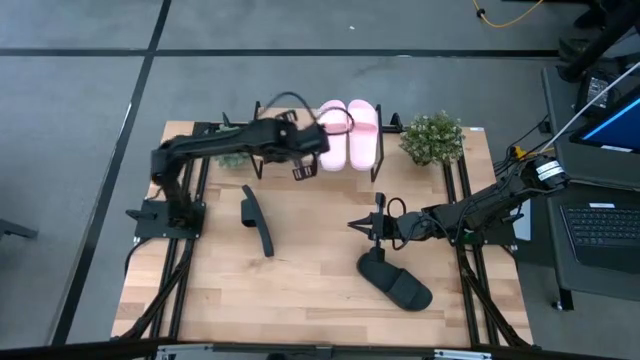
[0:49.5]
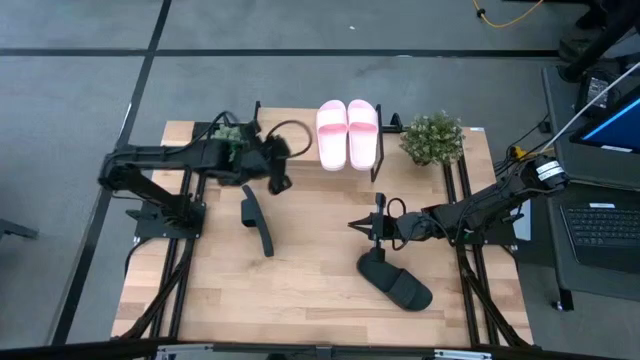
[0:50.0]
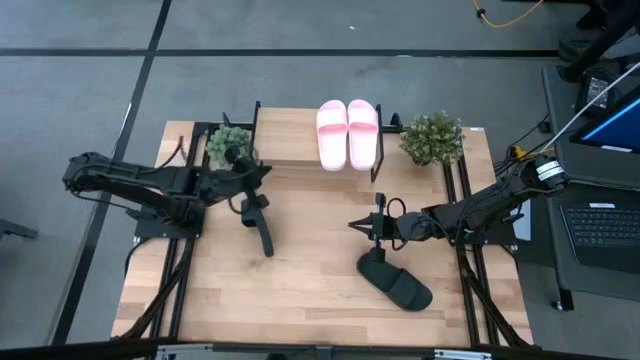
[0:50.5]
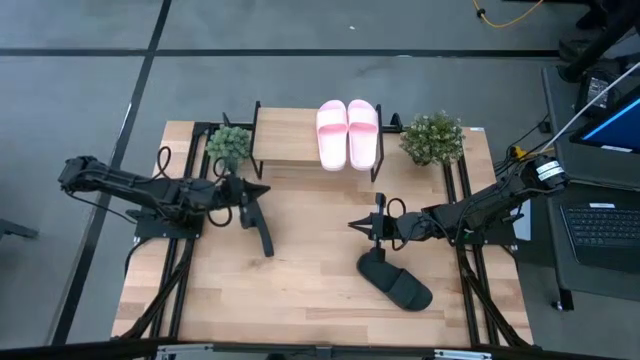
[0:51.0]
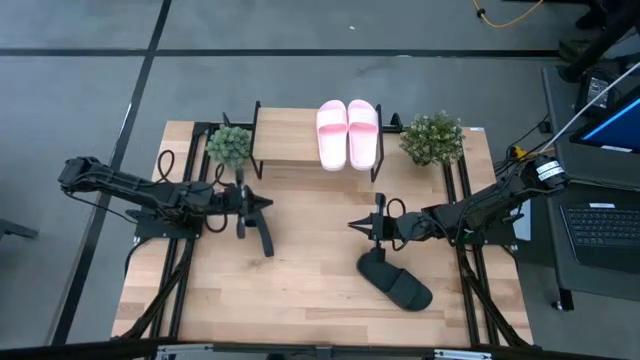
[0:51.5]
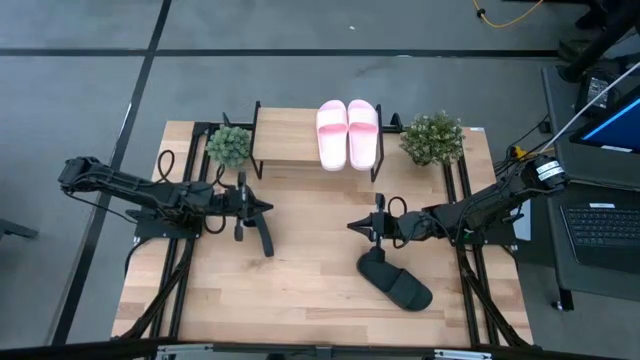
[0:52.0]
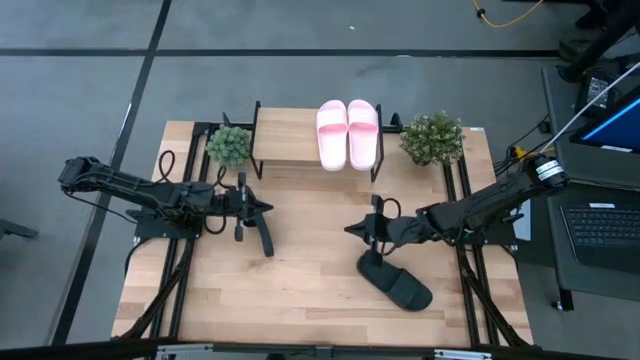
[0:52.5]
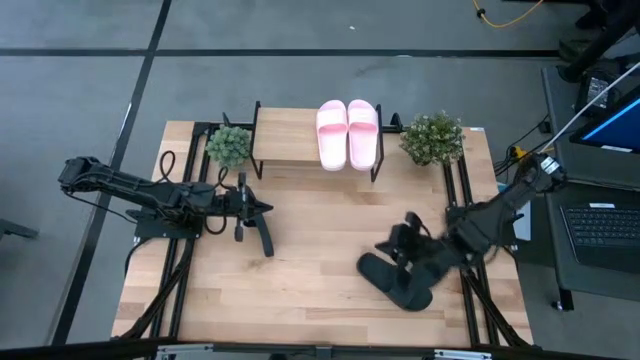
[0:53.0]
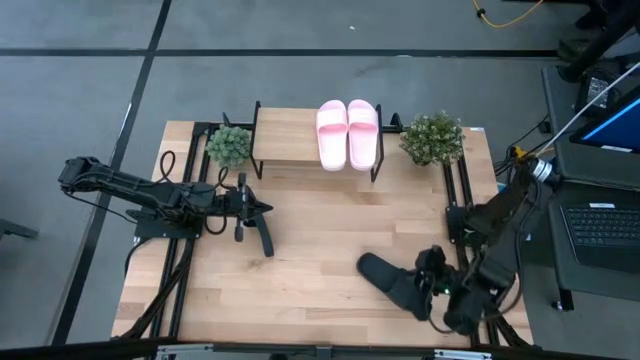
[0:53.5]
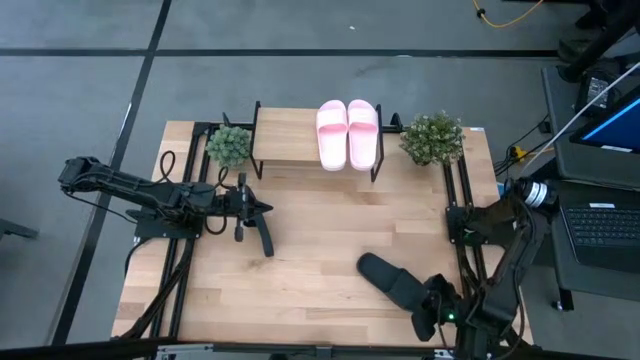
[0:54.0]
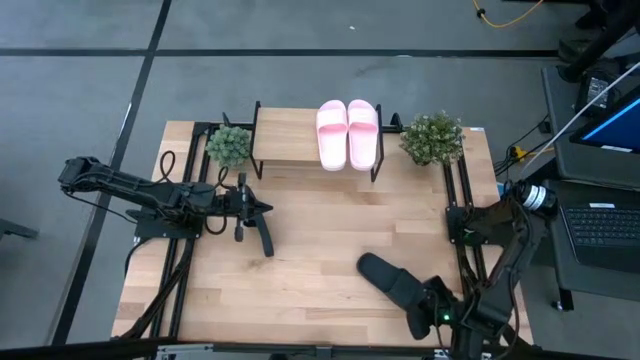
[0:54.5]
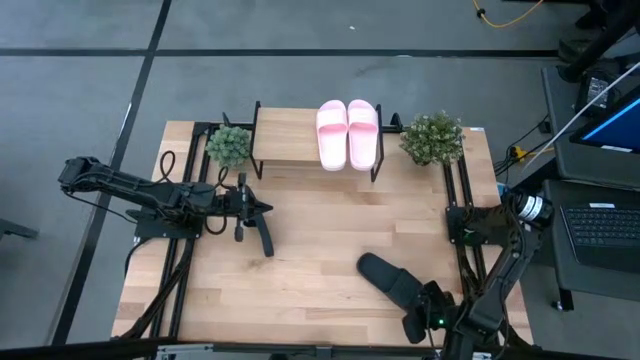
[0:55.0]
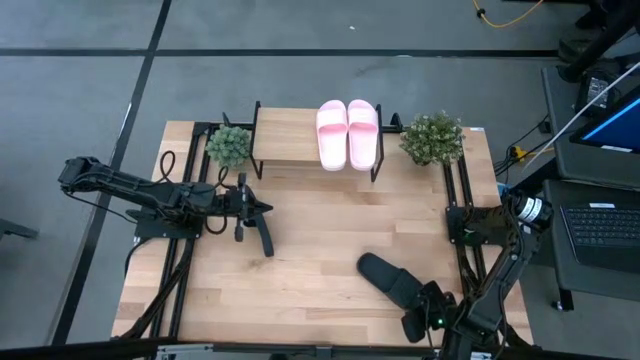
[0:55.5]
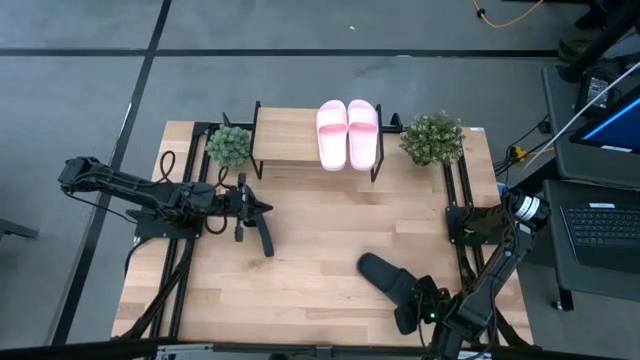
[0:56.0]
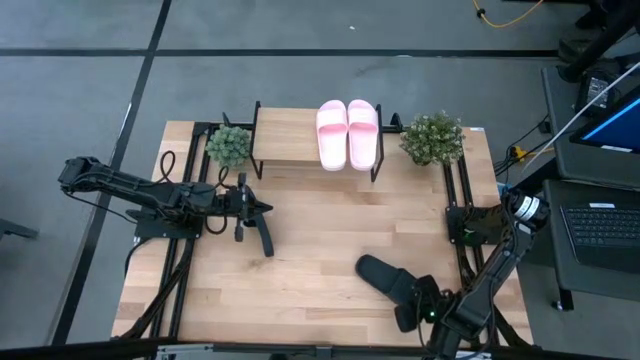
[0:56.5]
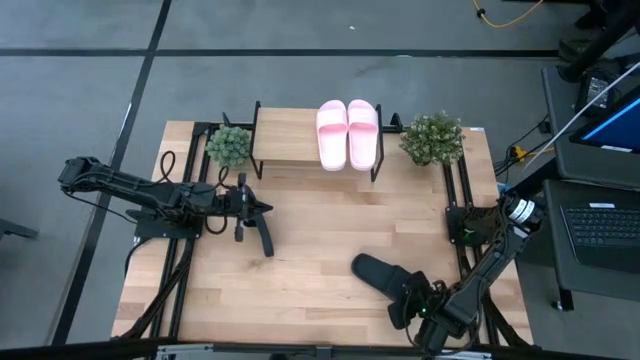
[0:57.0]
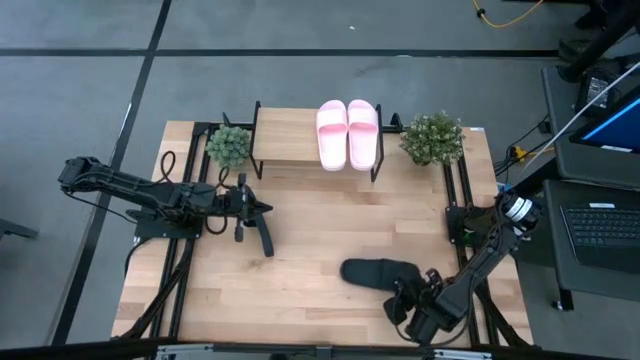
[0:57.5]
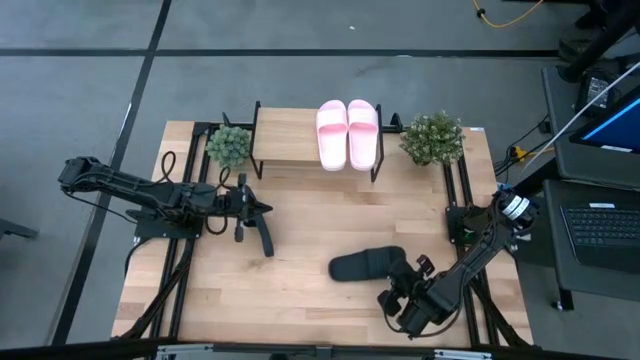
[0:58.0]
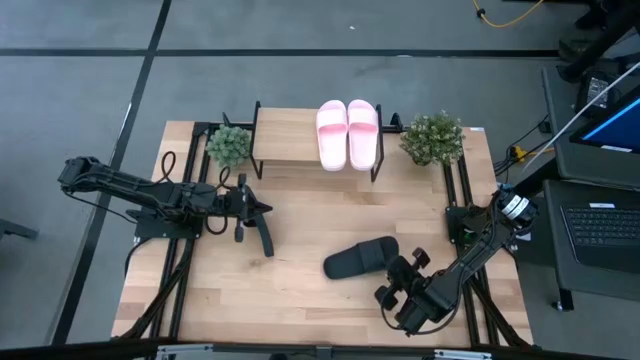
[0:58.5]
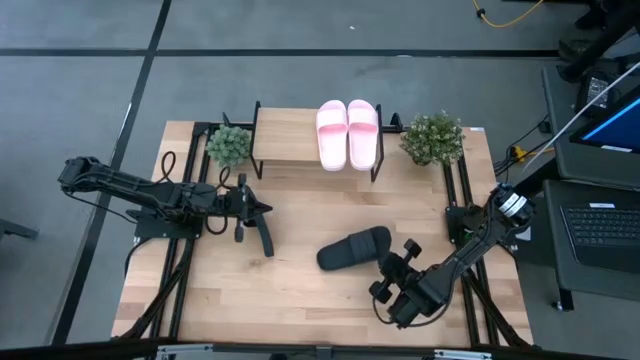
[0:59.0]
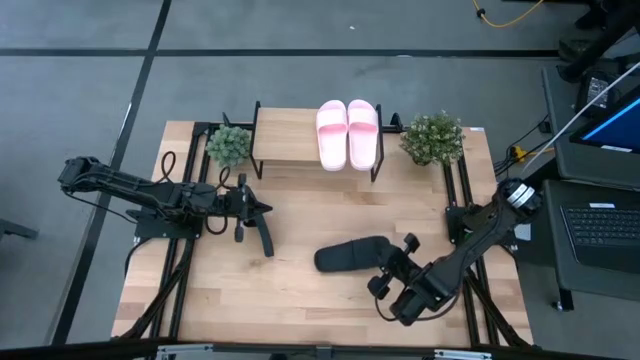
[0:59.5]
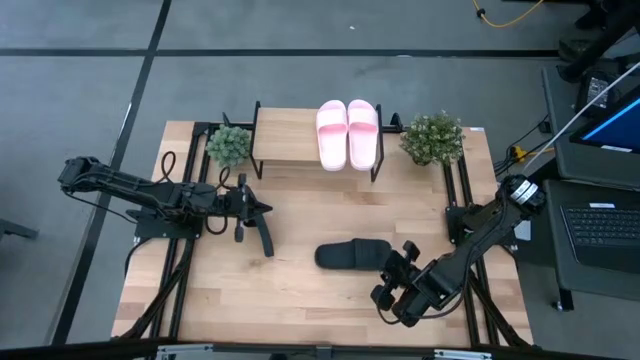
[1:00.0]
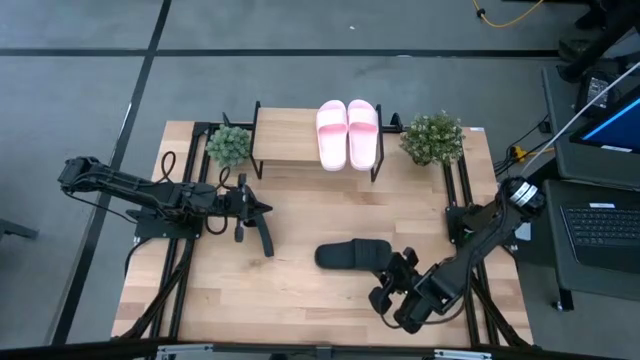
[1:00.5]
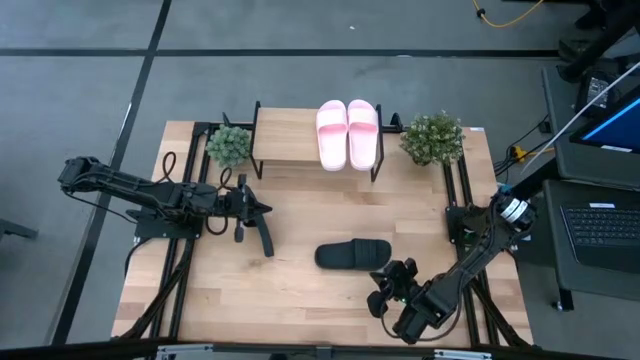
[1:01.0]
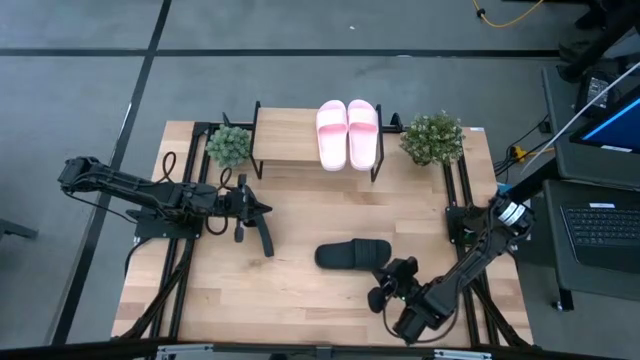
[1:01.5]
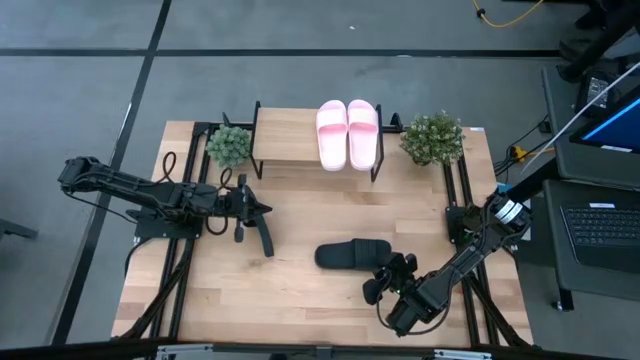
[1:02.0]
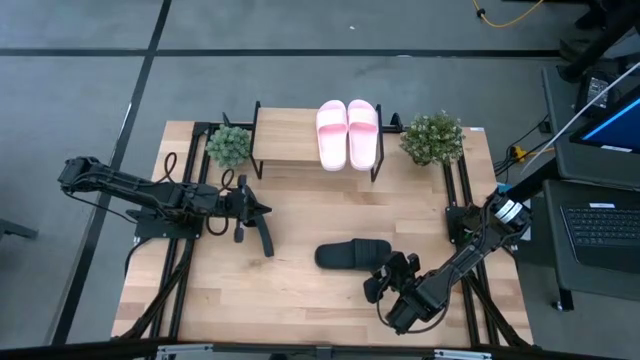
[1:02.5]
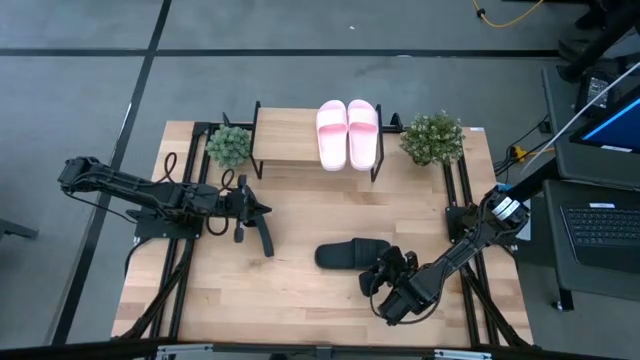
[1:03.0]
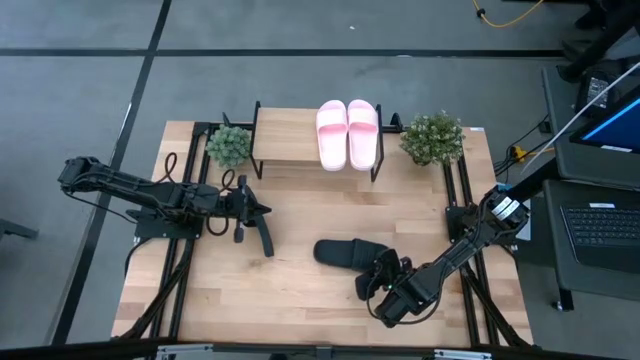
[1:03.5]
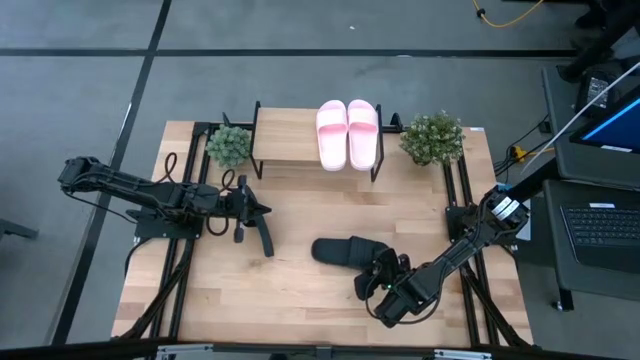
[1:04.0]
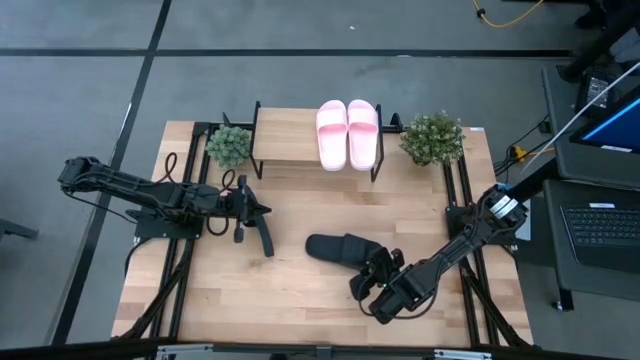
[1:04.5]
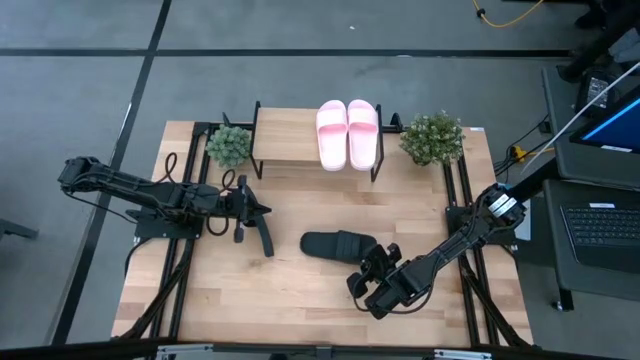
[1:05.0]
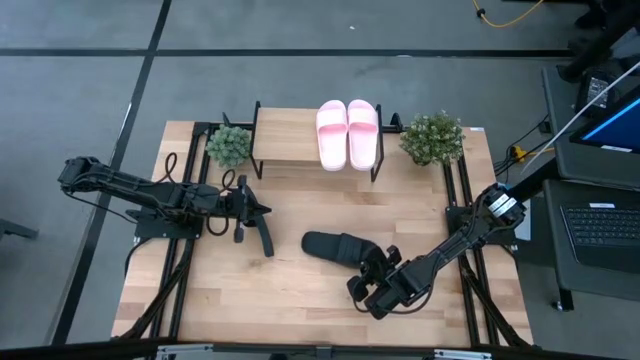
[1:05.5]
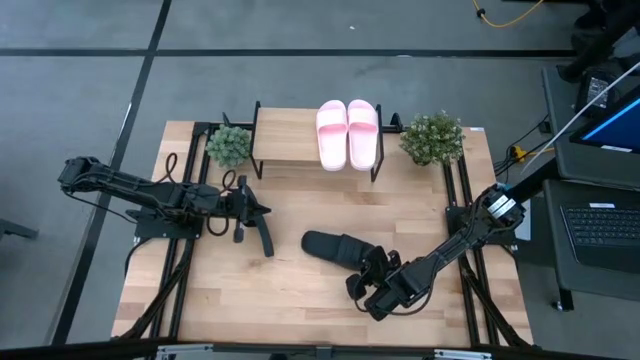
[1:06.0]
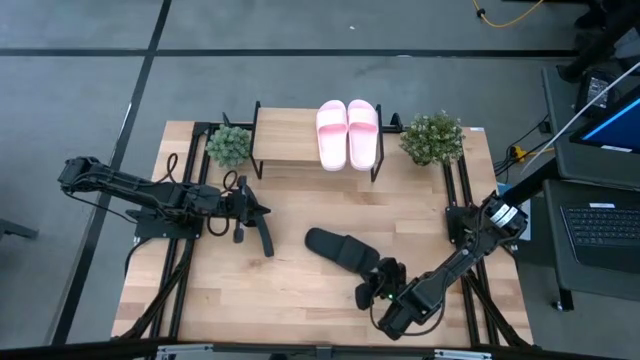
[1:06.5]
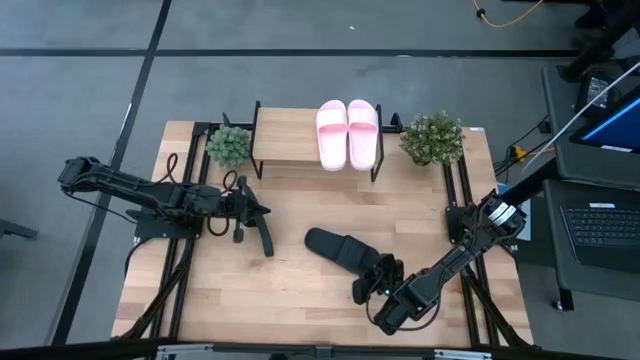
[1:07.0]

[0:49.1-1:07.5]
Task: Pick and place slides into the shelf
Put the bottom black slipper on the shelf

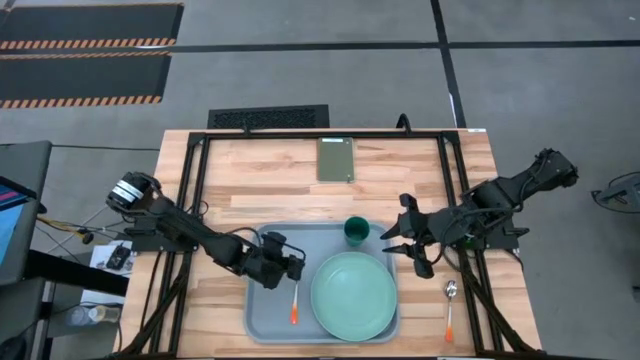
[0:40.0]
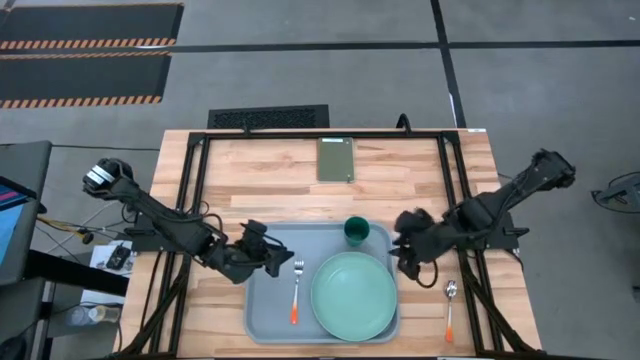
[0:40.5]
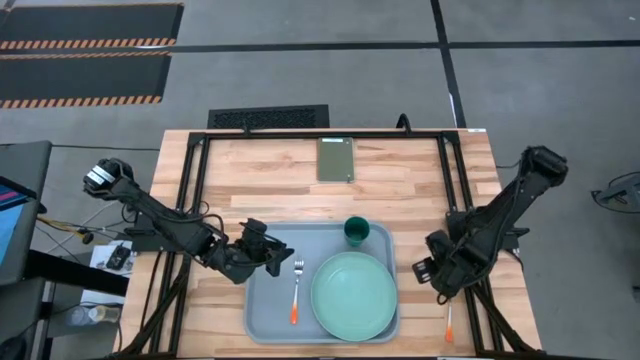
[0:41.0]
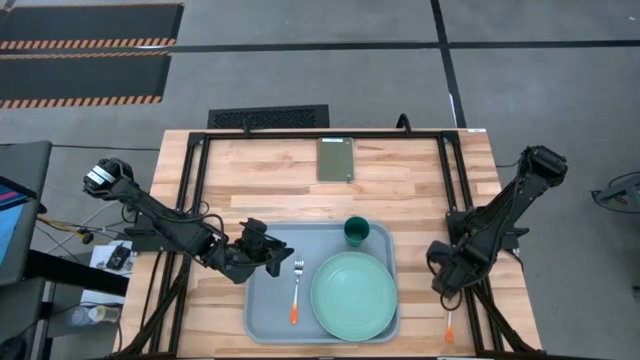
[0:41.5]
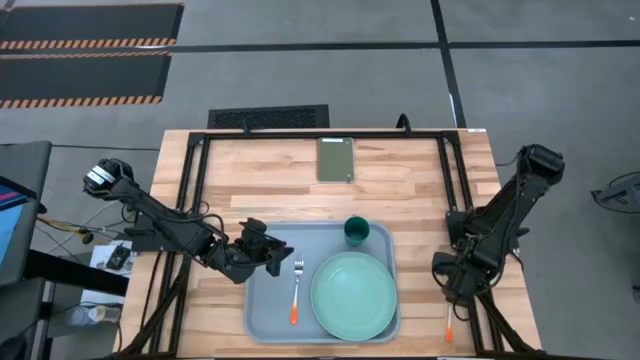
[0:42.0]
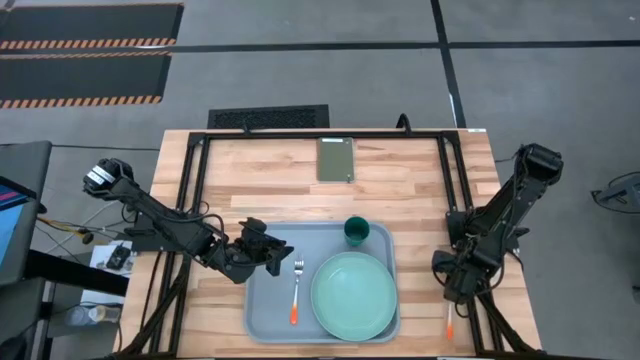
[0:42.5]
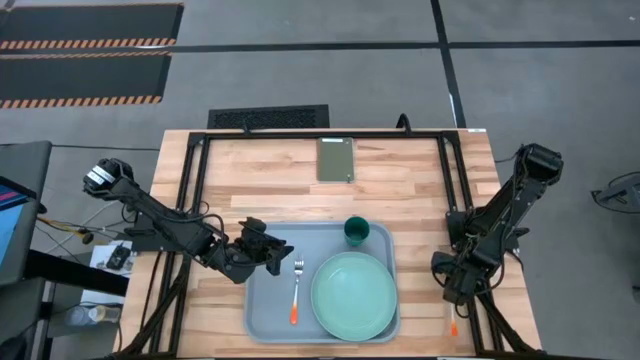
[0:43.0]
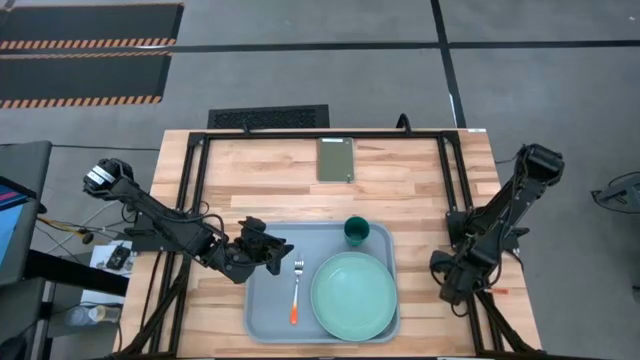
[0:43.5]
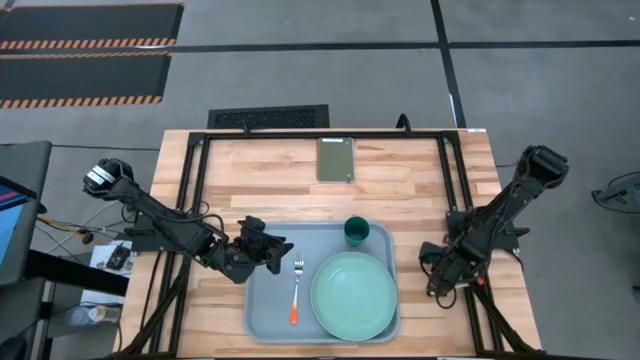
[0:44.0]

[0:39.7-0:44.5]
Task: Pick and place plate/cup/fork/spoon on tray
Put the orange spoon on the blue tray to the left of the orange fork
